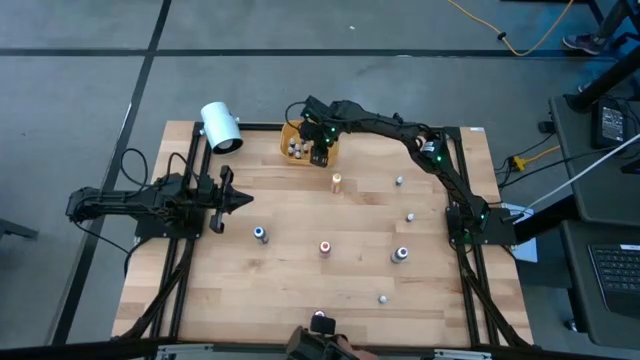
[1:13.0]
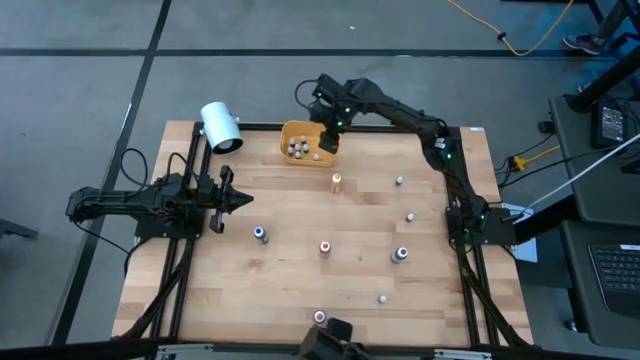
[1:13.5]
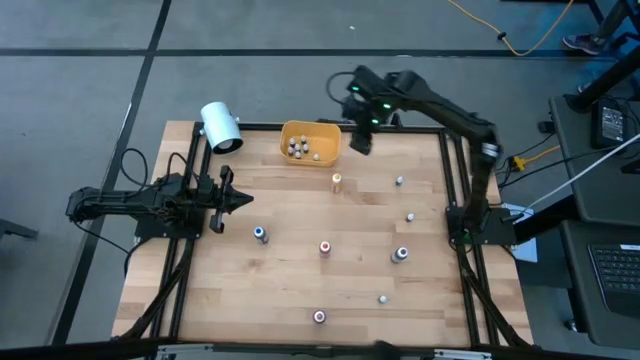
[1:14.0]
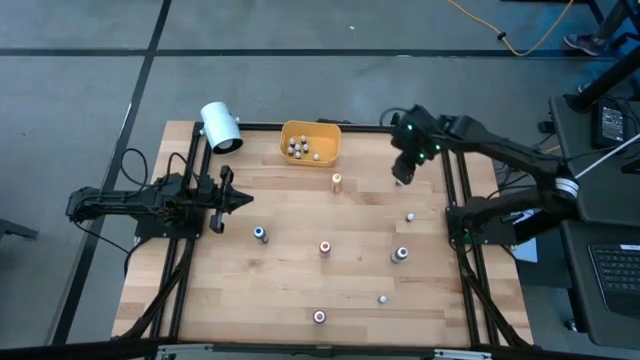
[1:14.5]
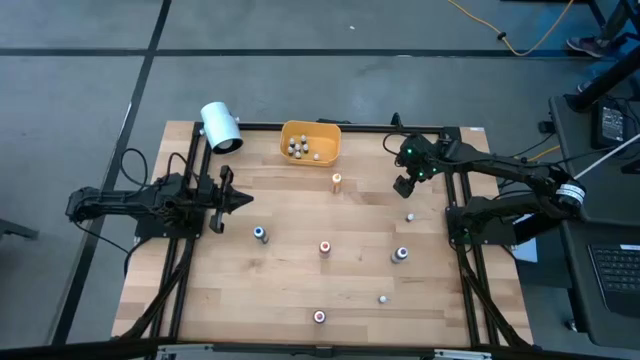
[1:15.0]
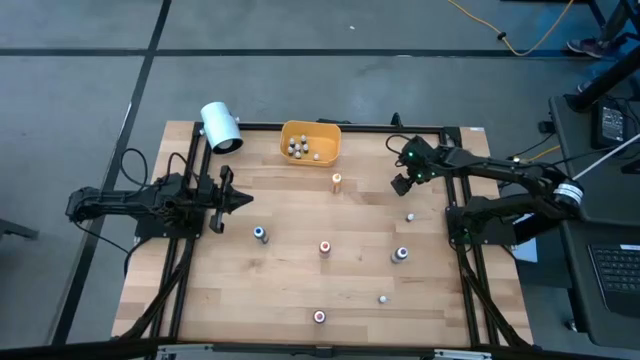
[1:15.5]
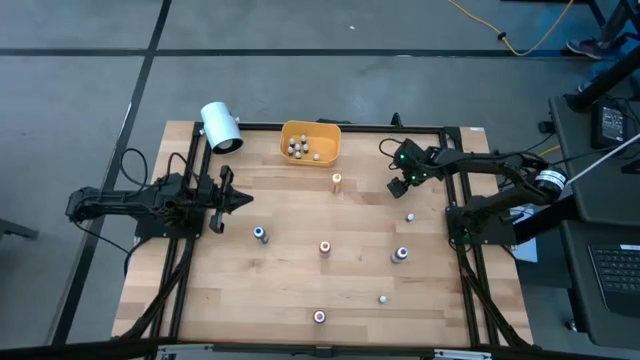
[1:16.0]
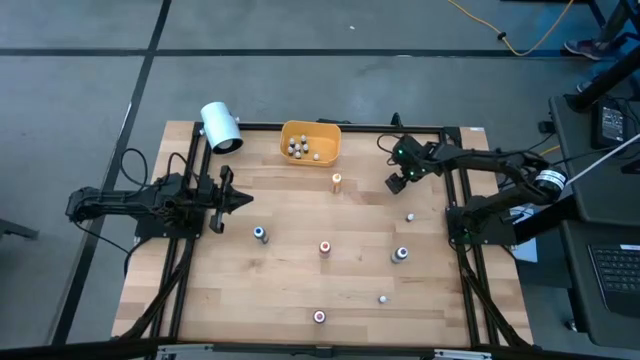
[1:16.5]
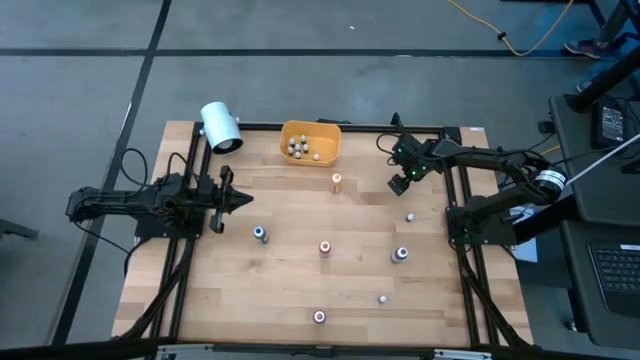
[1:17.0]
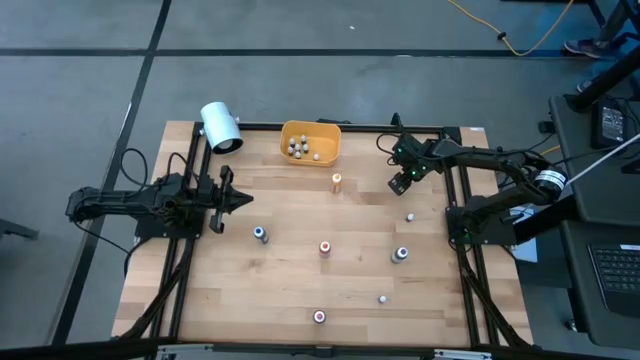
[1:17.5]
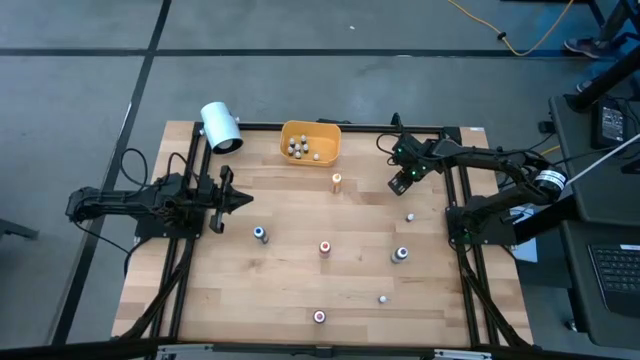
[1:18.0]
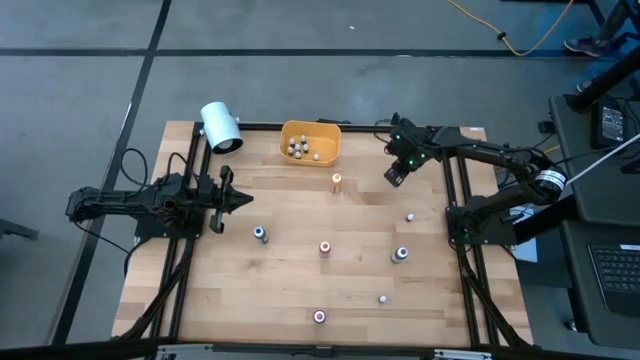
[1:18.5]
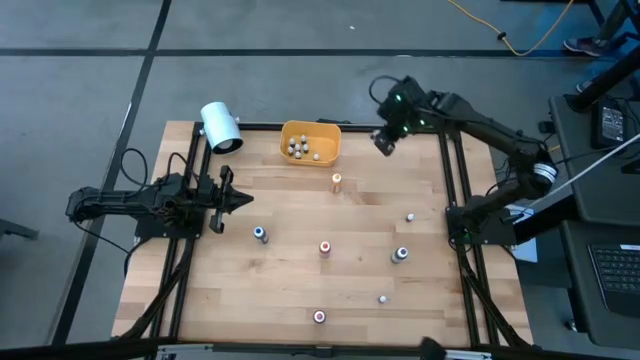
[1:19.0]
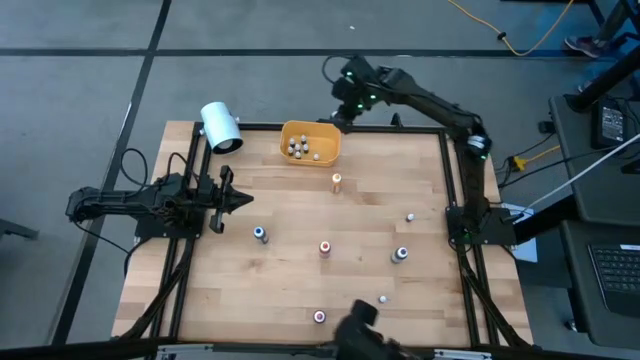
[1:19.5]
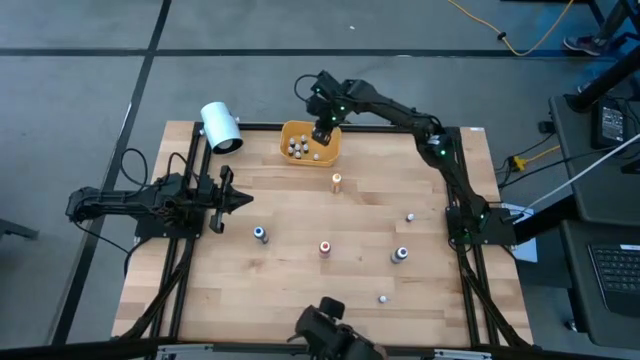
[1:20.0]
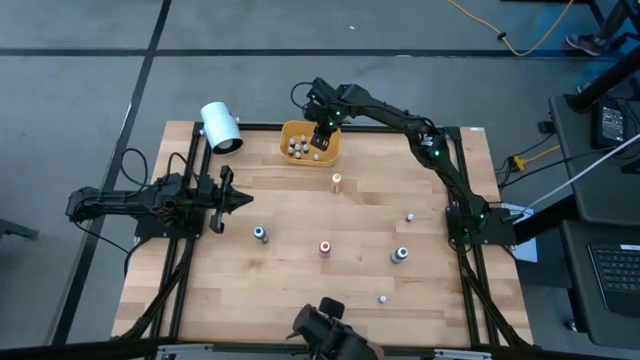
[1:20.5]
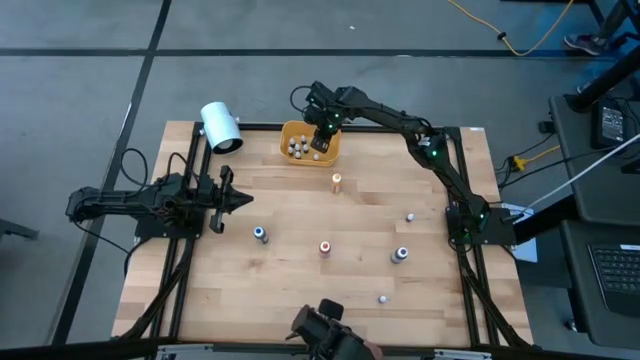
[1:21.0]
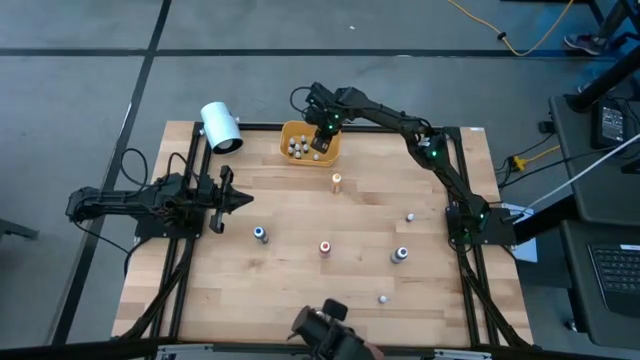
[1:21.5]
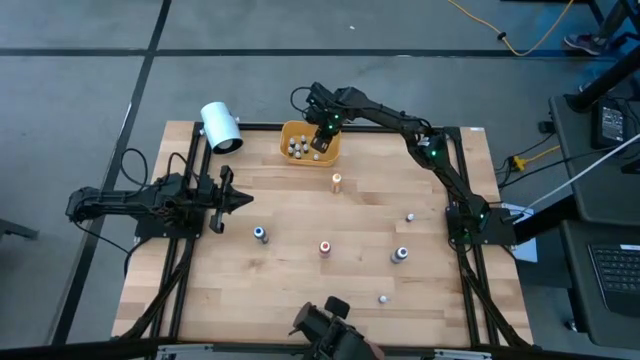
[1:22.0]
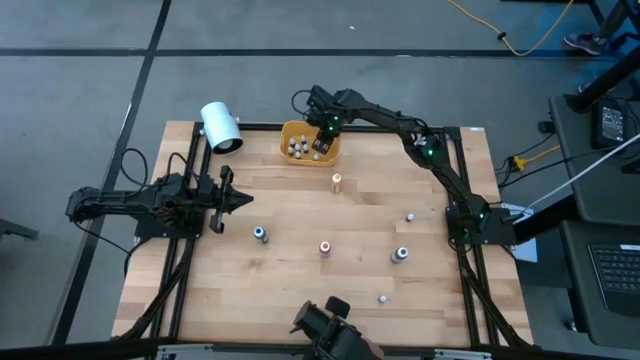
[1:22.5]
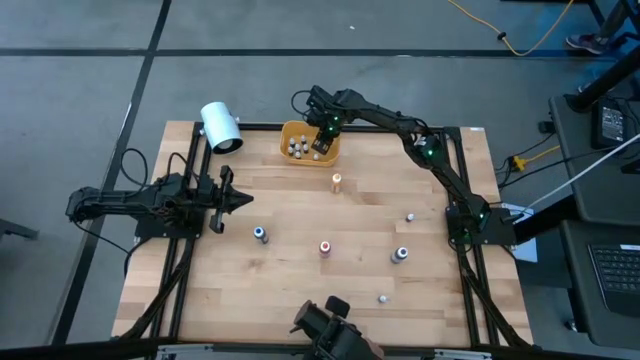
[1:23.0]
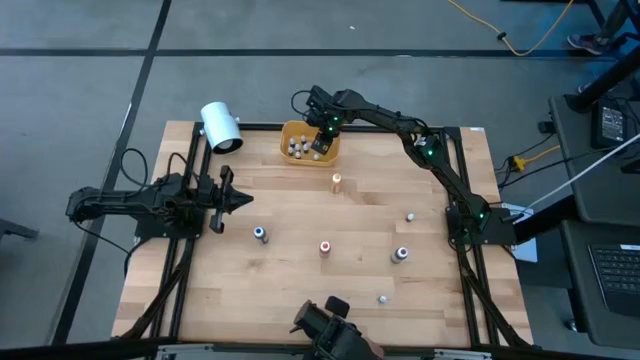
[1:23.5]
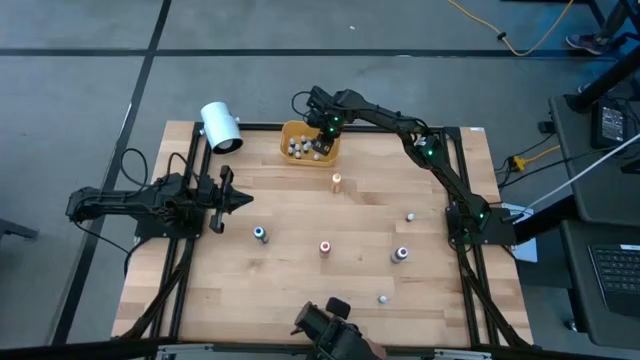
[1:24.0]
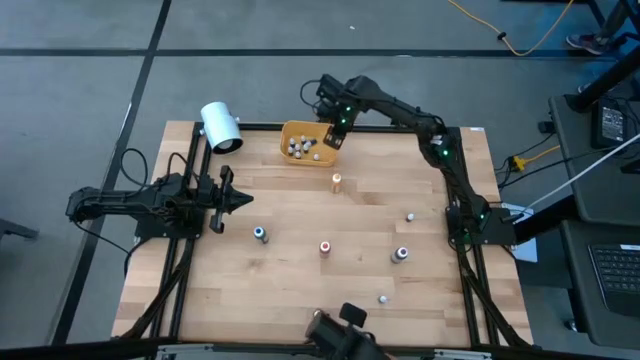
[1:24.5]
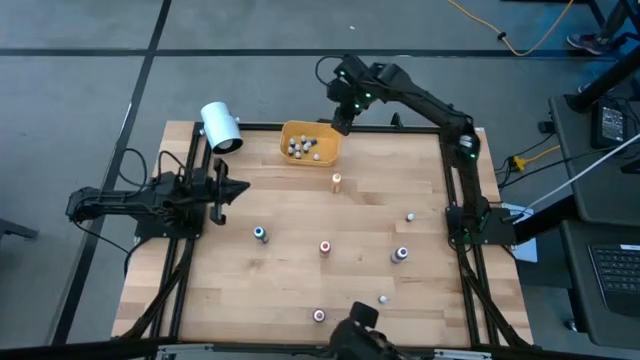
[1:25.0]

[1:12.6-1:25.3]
Task: Pick & Place food coloring
Put the small blue food coloring bottle into the yellow bin

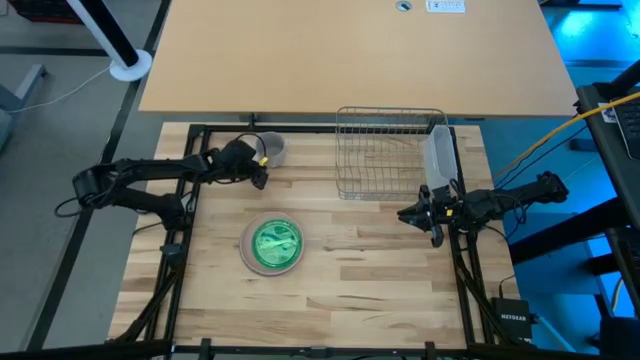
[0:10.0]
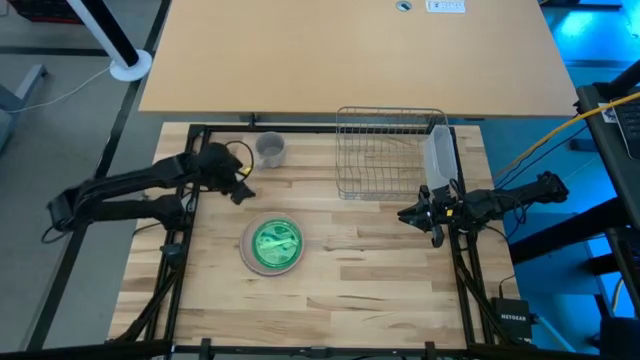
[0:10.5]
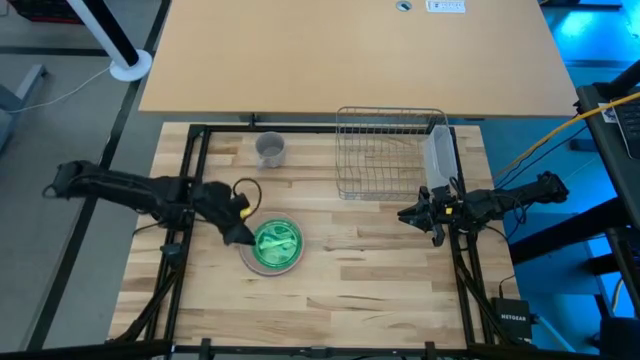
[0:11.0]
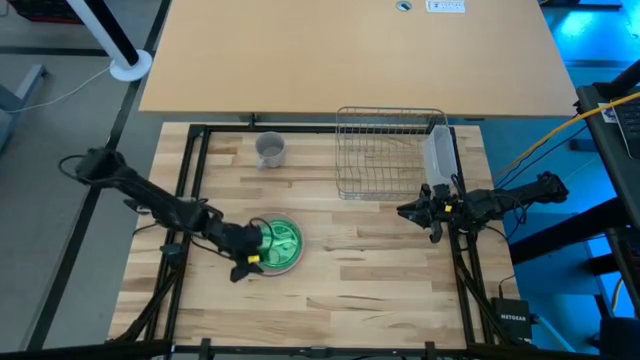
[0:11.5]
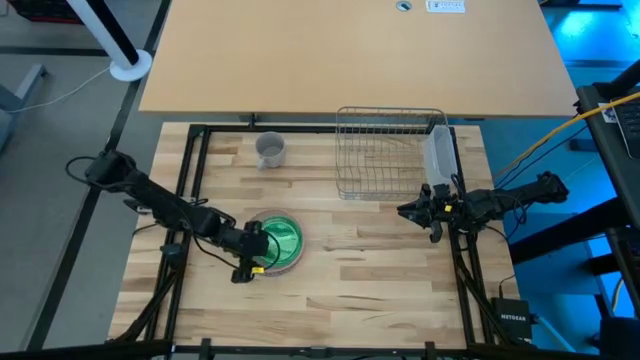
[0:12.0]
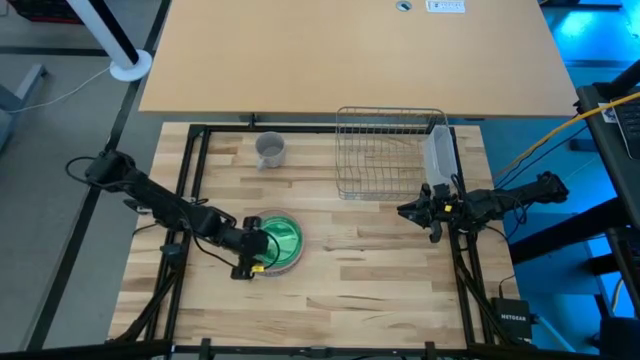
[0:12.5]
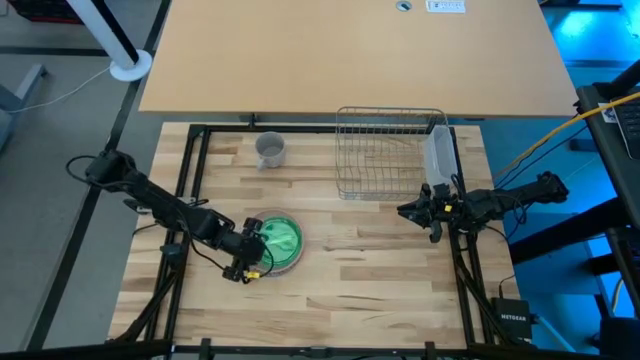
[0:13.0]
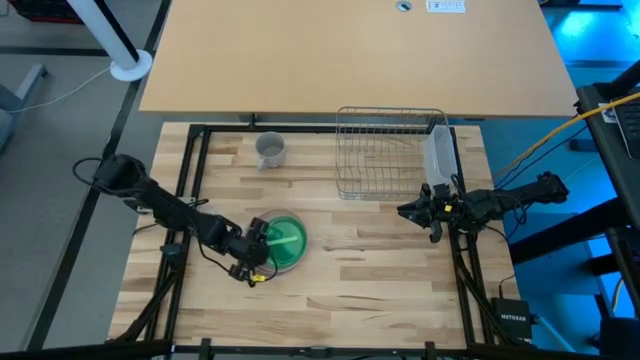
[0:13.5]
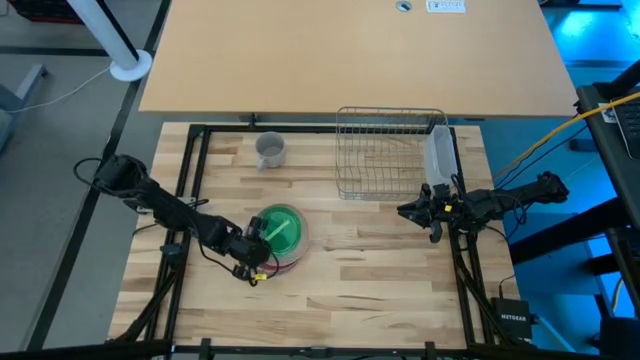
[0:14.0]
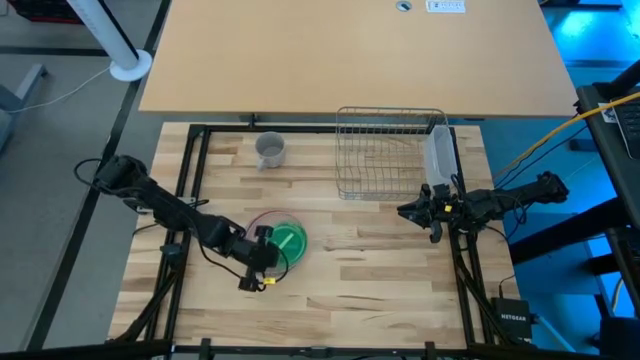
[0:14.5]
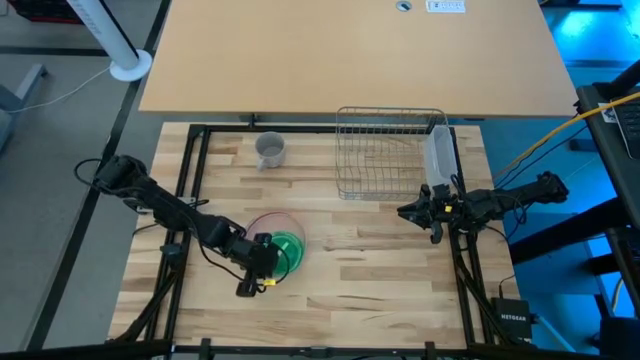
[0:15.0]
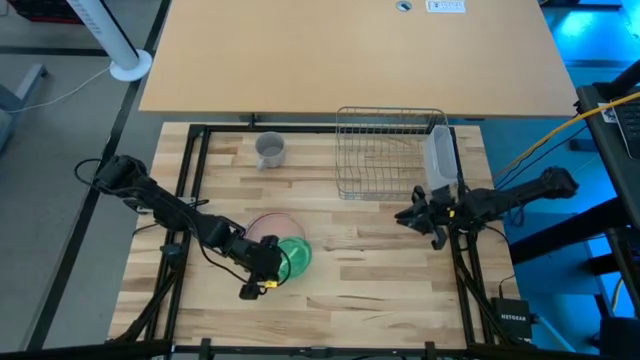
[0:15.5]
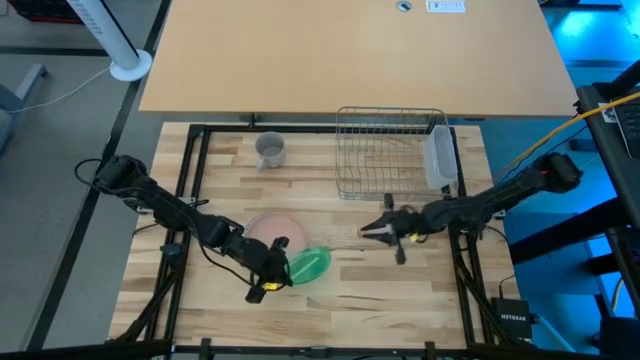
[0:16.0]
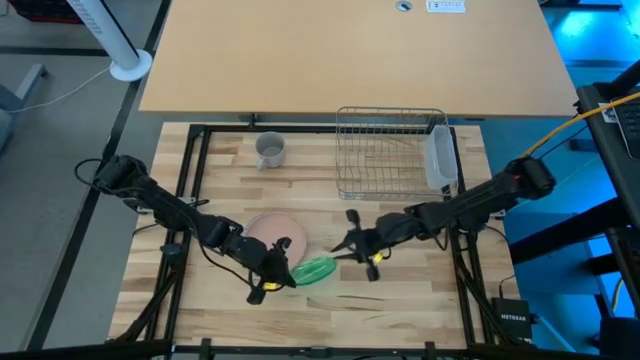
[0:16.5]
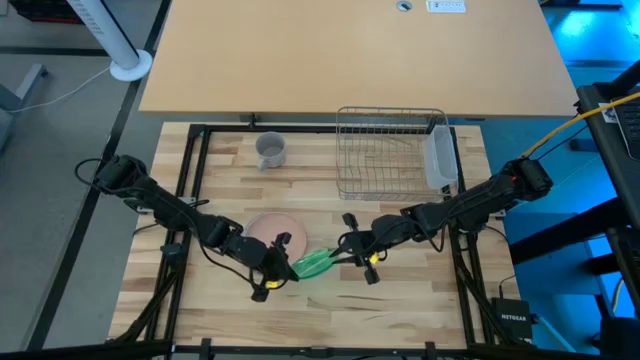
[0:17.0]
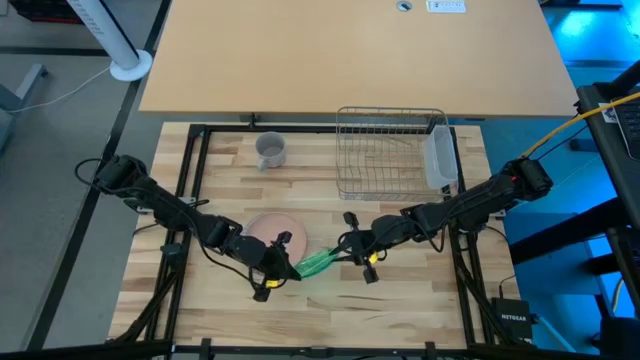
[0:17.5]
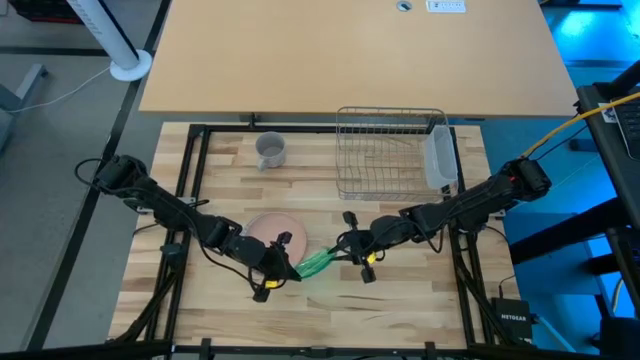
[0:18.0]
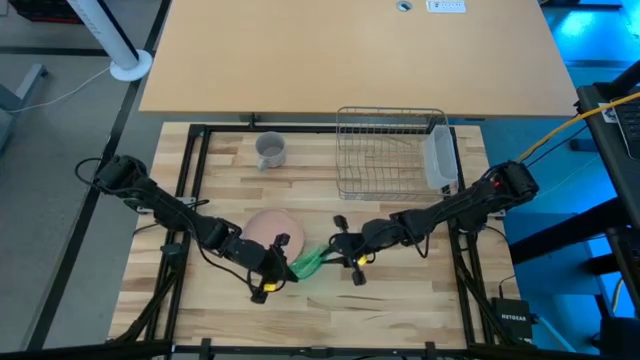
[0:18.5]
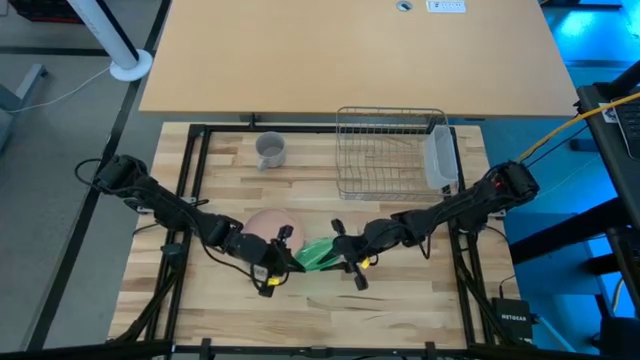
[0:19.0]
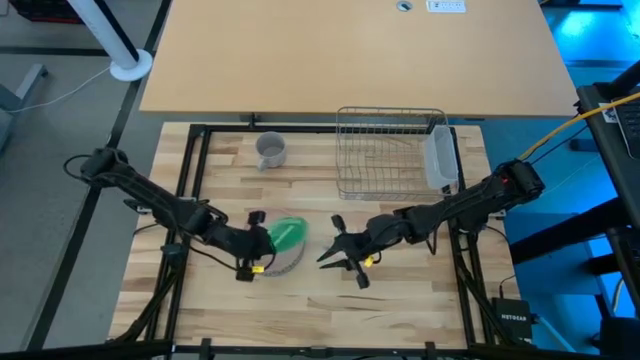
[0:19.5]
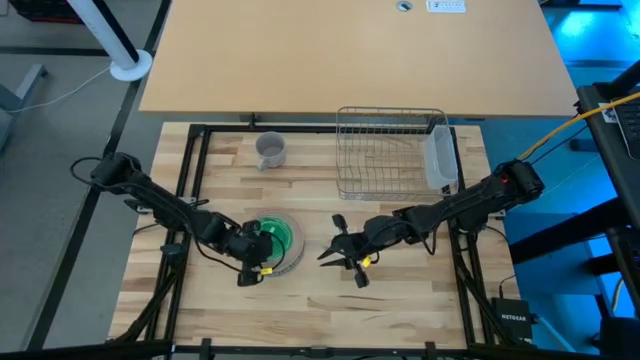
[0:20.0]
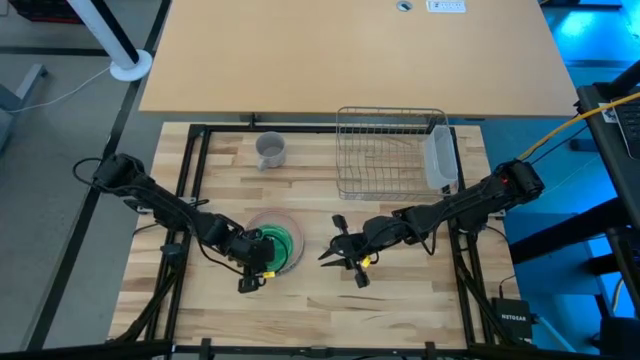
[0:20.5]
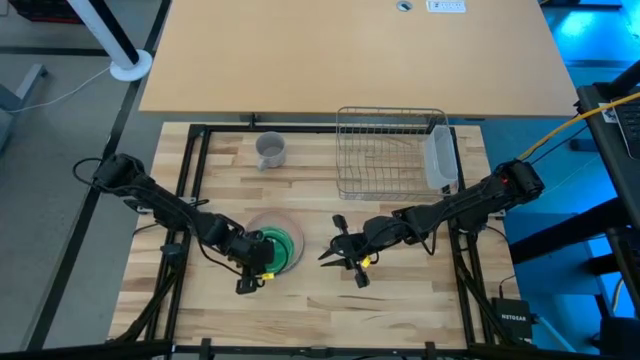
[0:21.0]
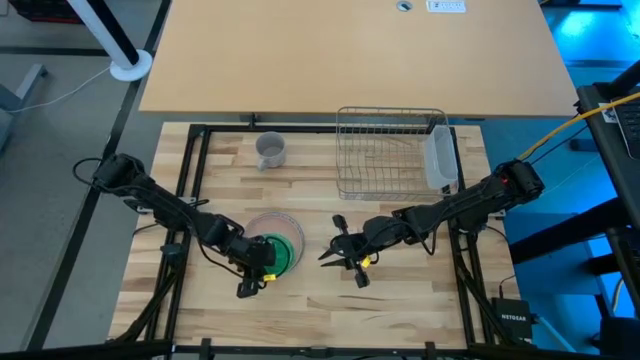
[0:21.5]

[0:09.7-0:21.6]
Task: Sort dishes
Put the green plate into the dish rack
